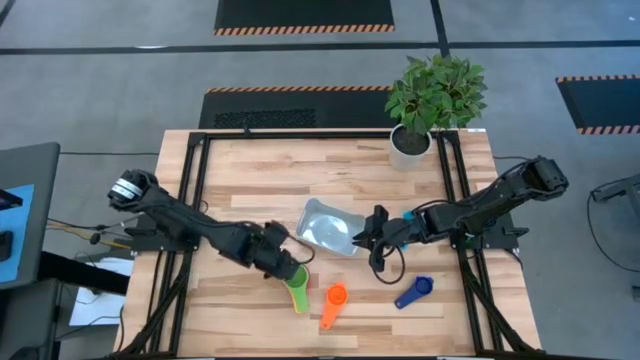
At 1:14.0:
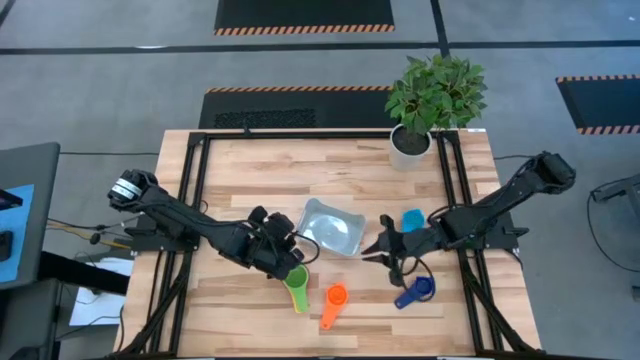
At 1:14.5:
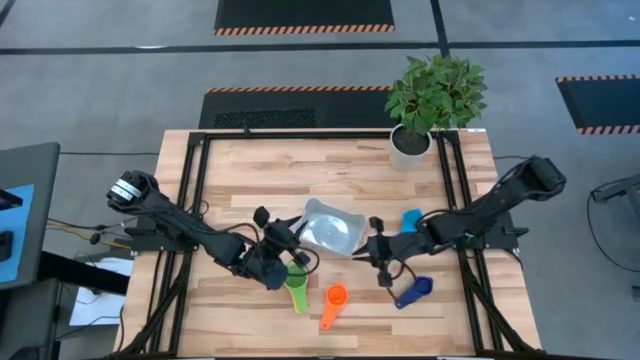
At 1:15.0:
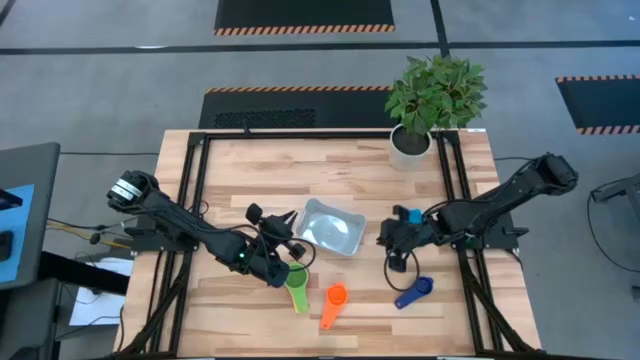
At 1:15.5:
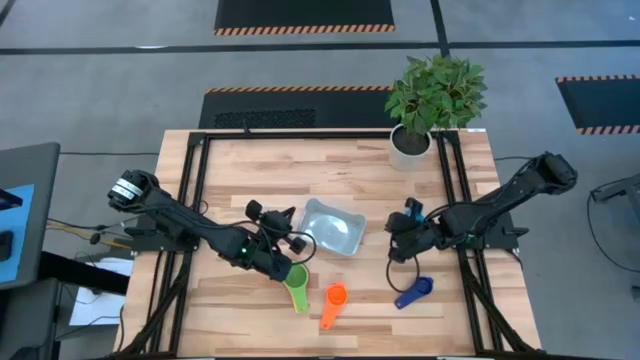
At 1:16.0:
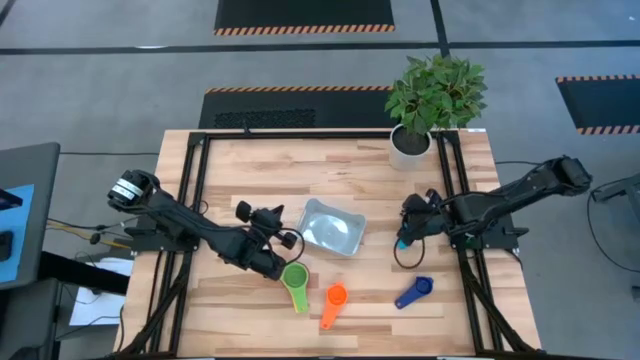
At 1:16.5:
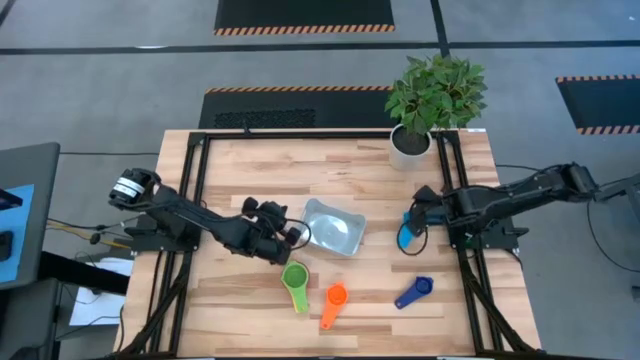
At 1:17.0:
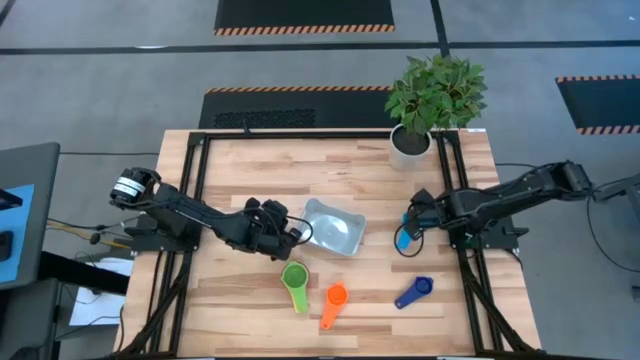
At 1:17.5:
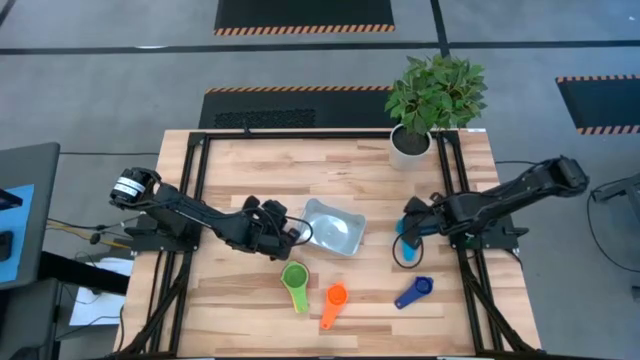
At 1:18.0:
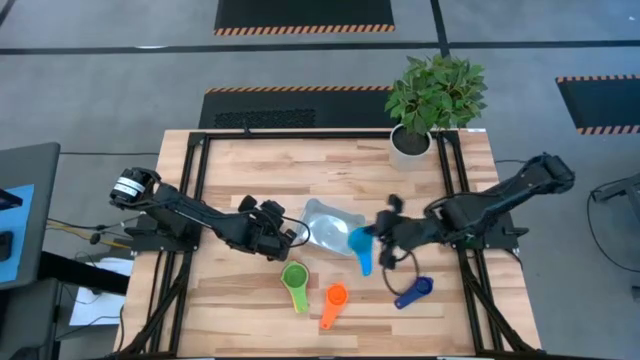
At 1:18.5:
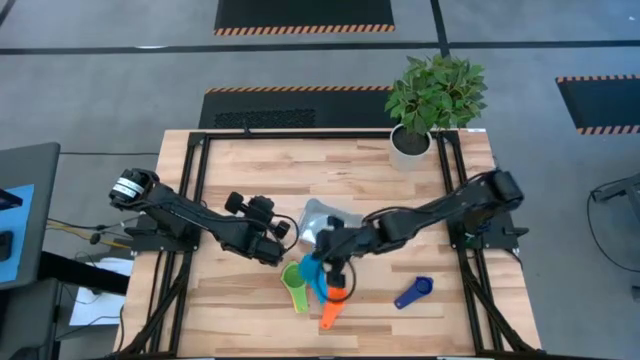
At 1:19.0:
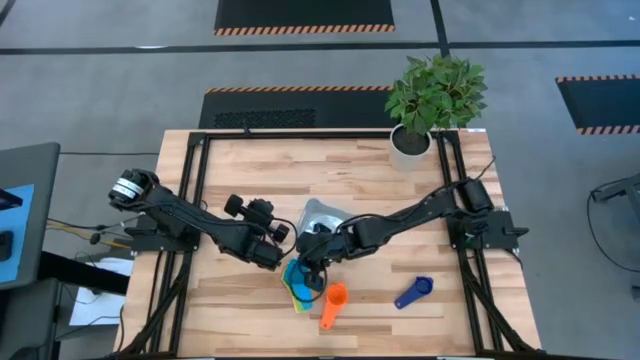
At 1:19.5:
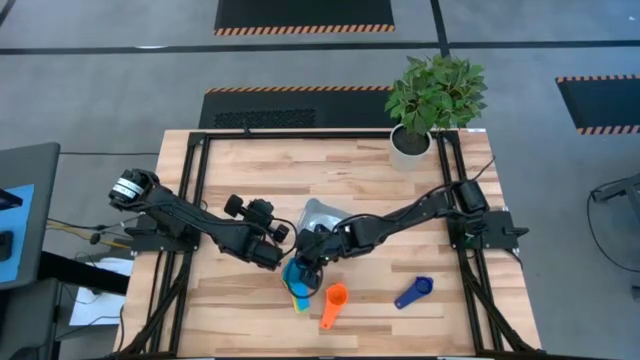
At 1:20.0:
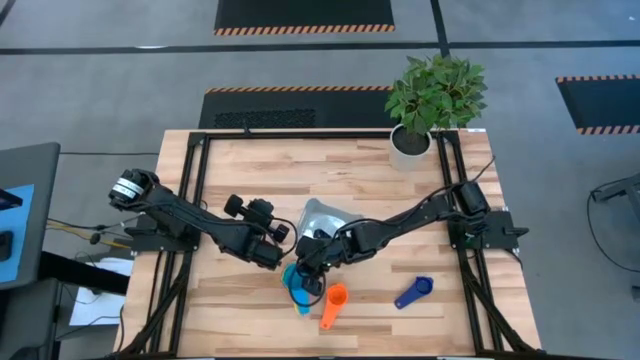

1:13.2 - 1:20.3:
Task: Nest measuring cups in basket
Stack the light blue measuring cup on top of the green measuring cup

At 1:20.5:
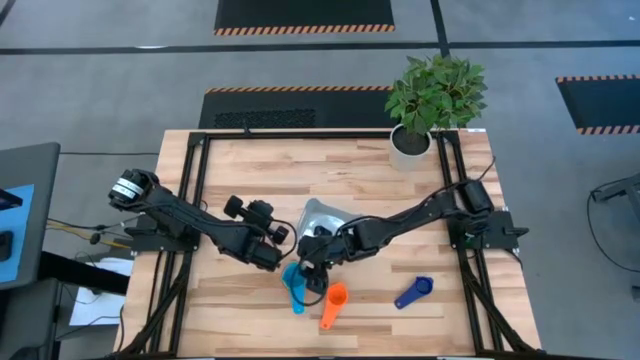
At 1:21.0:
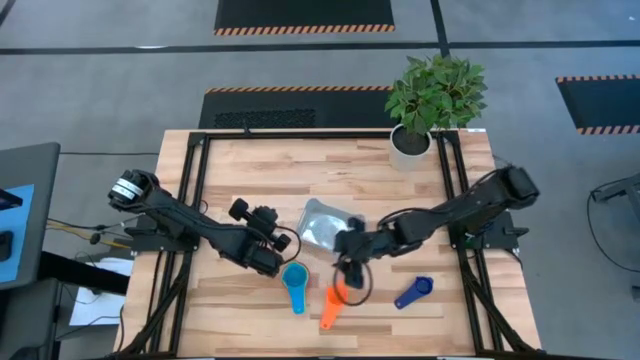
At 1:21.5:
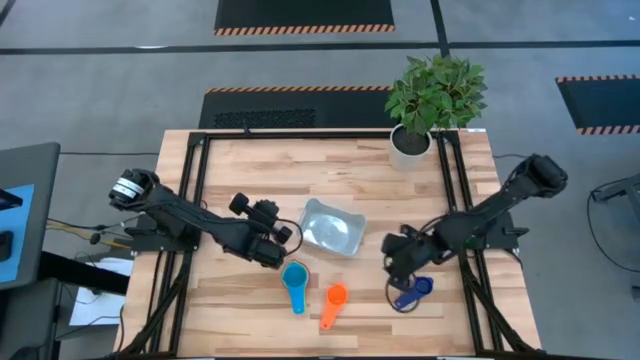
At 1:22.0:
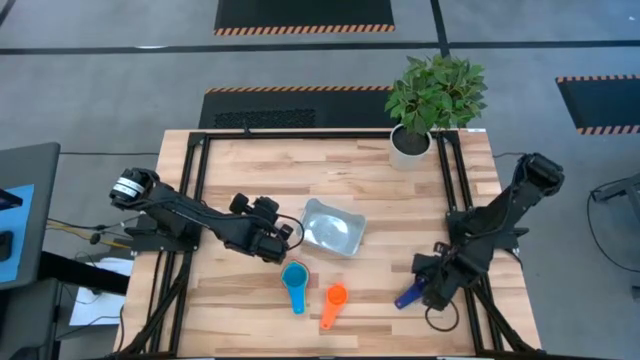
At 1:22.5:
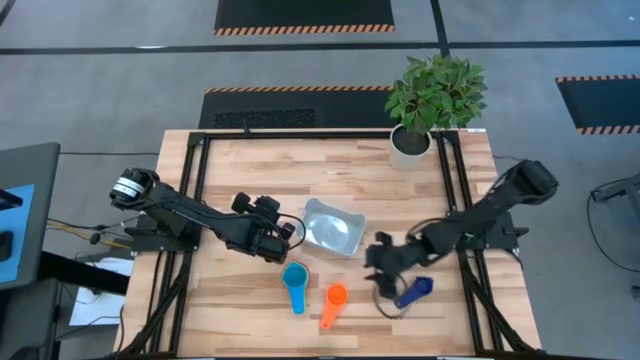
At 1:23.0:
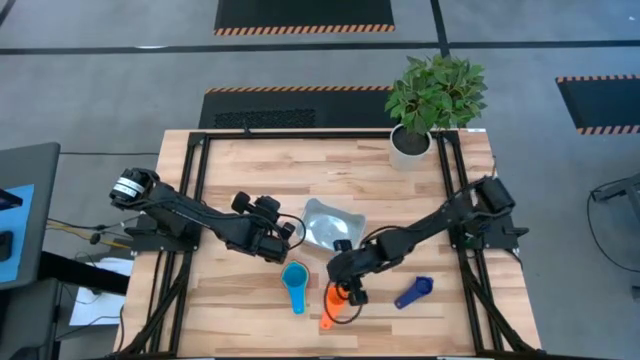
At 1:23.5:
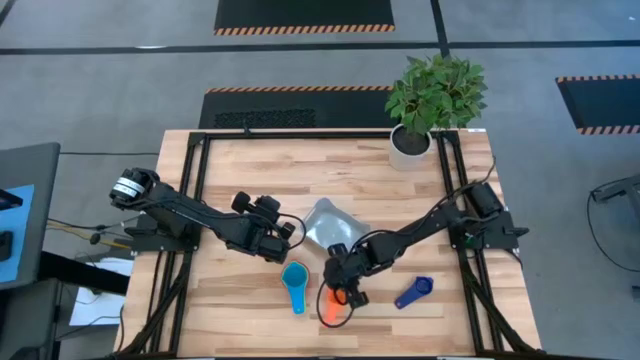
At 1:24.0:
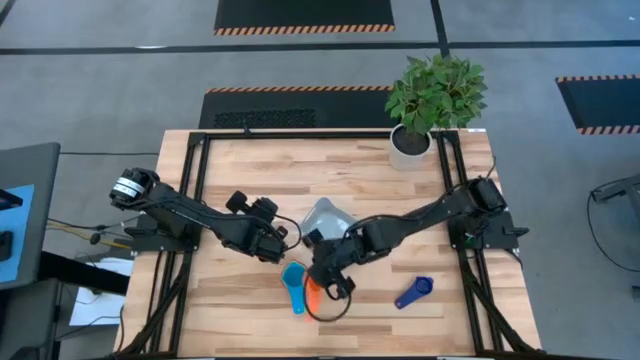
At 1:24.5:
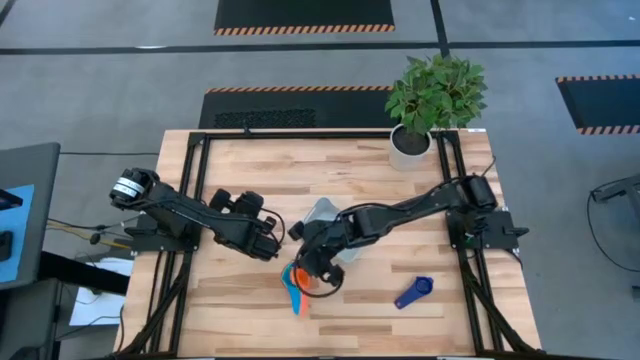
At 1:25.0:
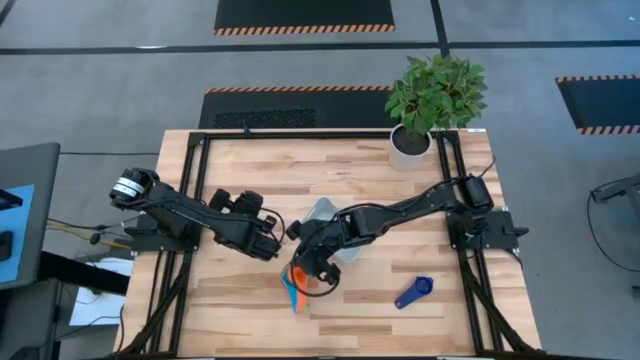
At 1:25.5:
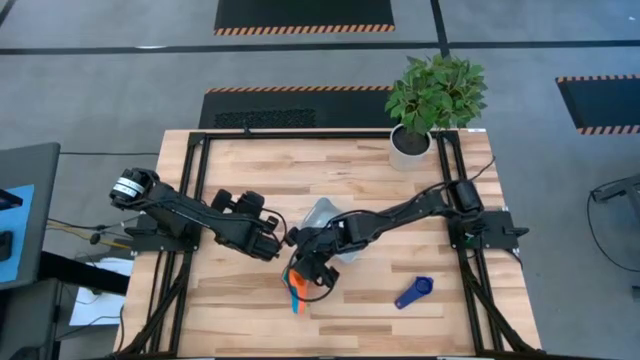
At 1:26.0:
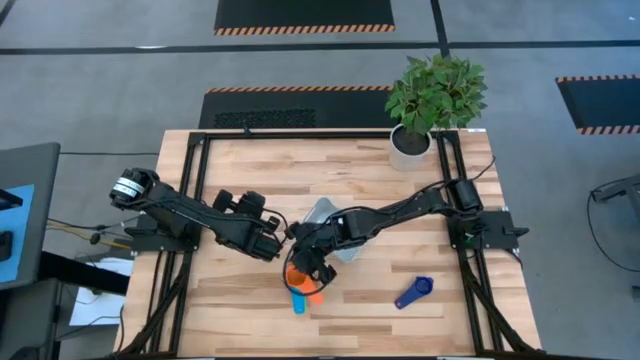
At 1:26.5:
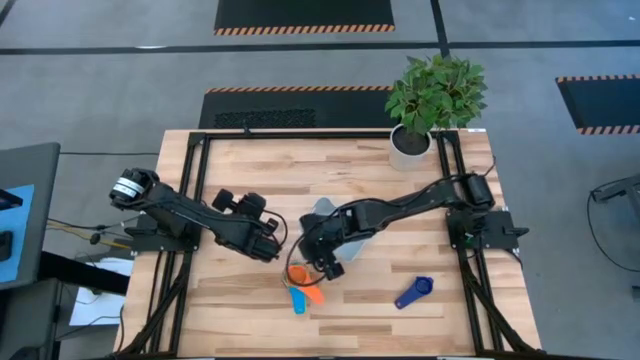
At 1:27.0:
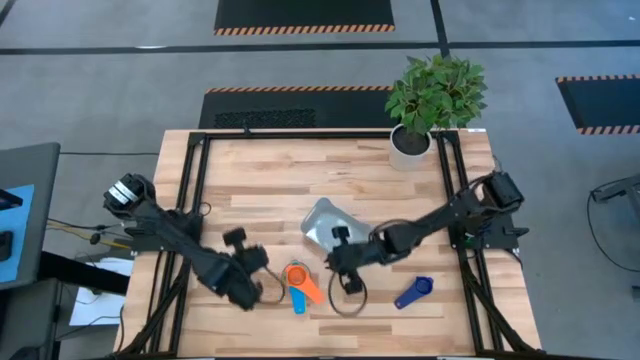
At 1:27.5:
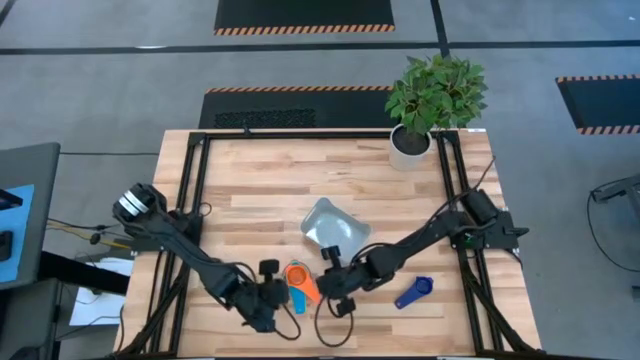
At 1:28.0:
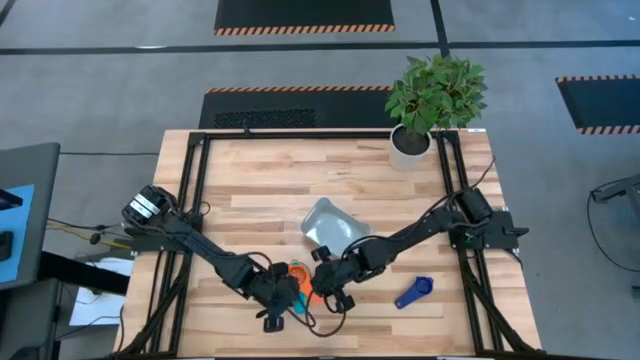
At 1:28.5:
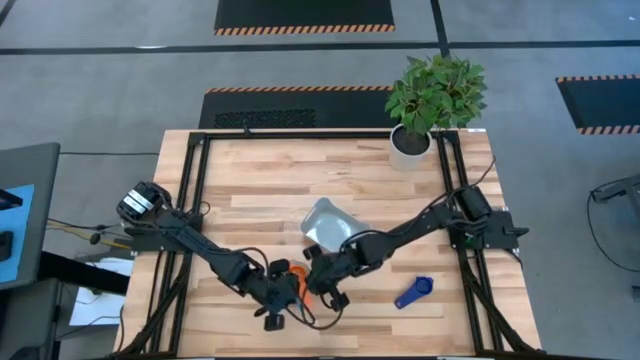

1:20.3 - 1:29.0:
Stack the orange measuring cup on top of the light blue measuring cup

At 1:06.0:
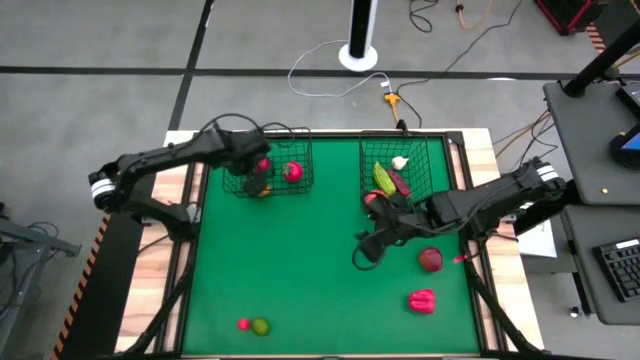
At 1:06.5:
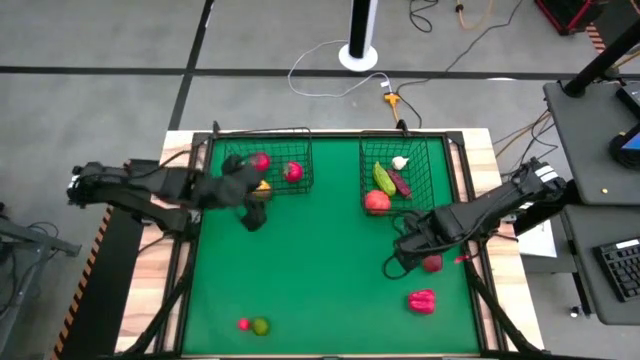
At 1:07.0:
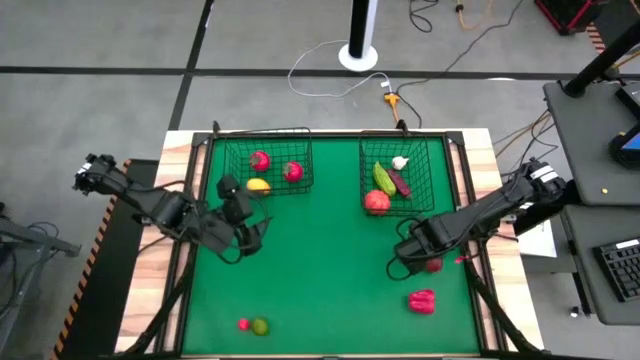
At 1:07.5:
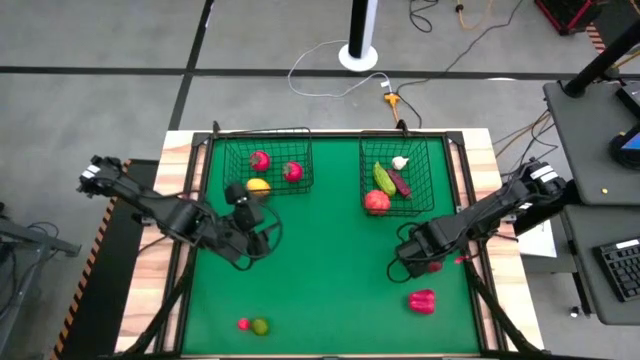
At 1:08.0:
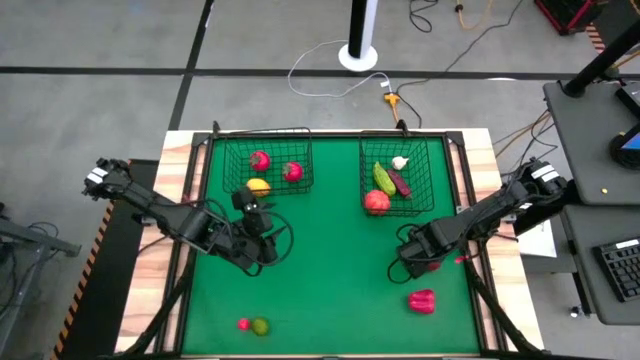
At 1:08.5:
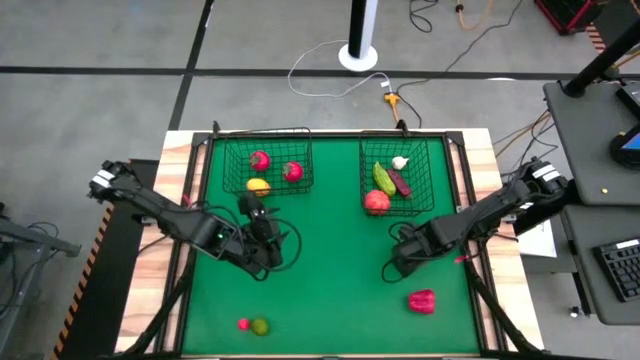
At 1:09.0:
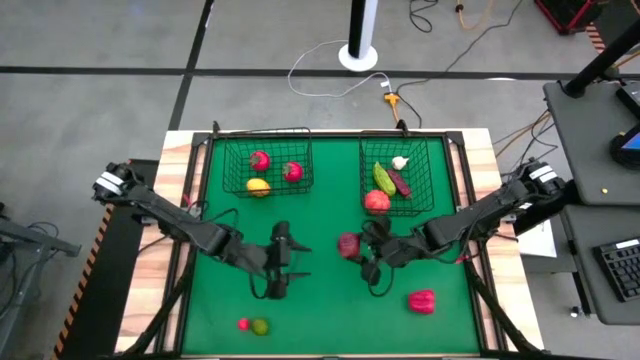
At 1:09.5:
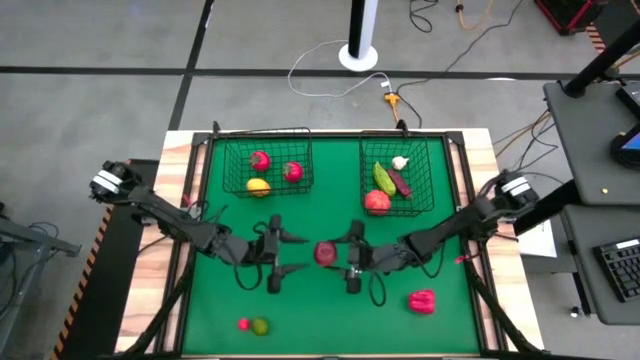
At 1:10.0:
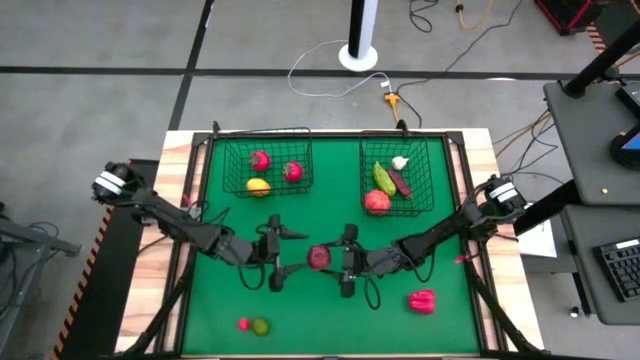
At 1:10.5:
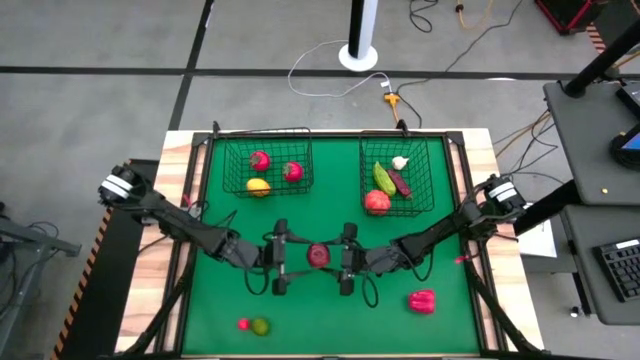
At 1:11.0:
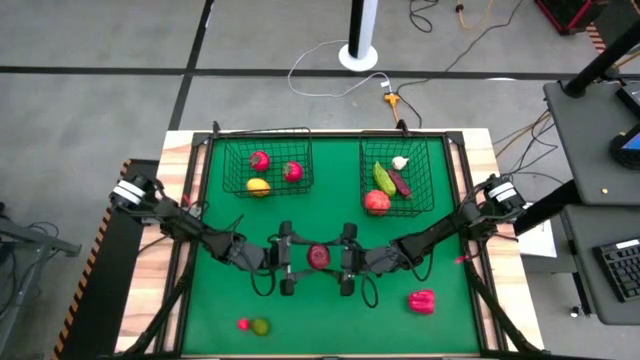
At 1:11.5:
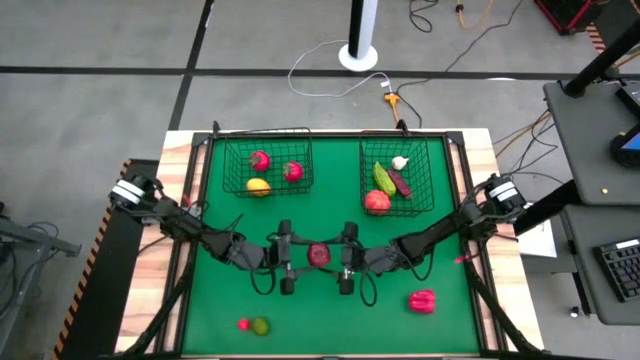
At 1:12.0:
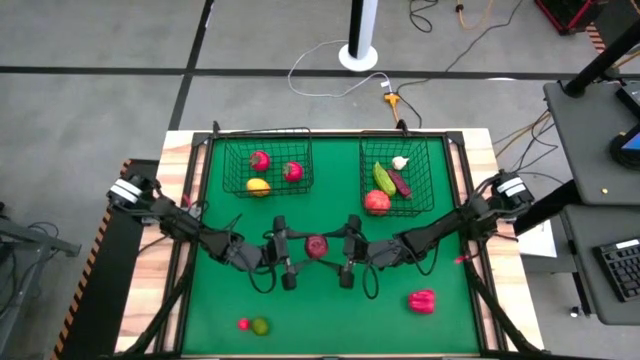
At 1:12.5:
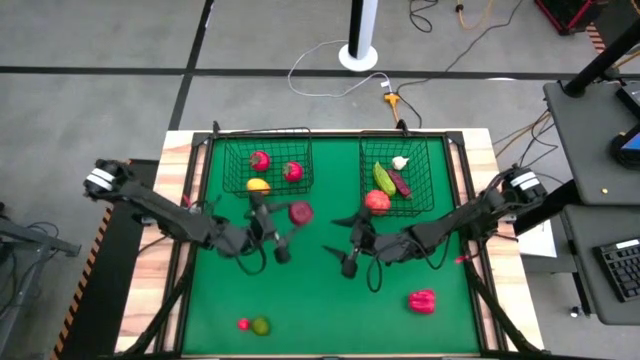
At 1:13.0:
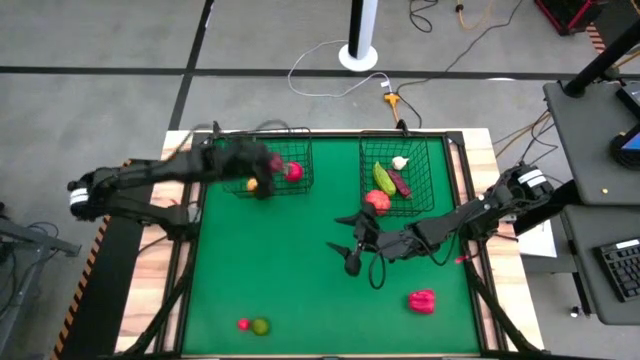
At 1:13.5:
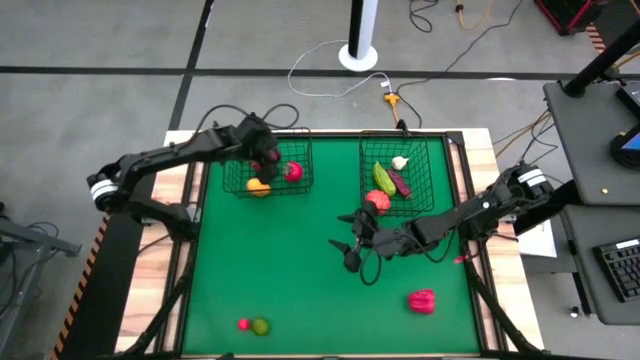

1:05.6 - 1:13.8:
Task: Sort produce into baskets
Put the dark red apple into the left wire basket
